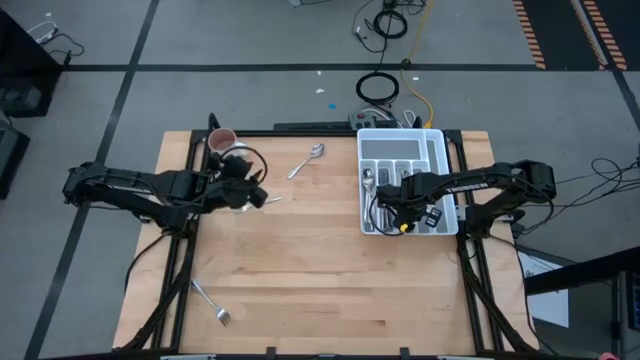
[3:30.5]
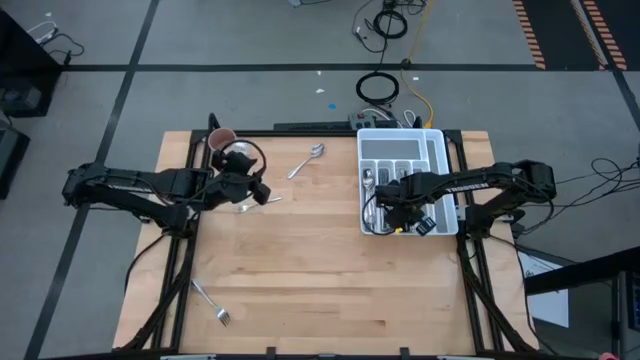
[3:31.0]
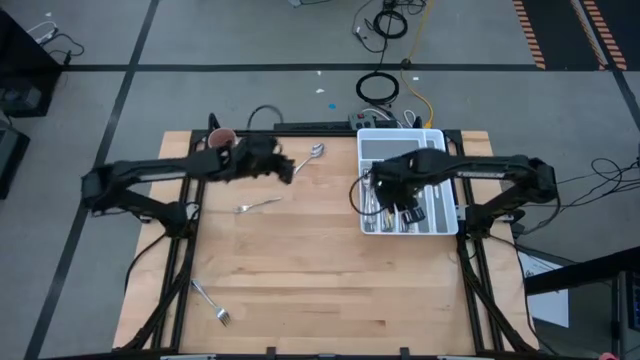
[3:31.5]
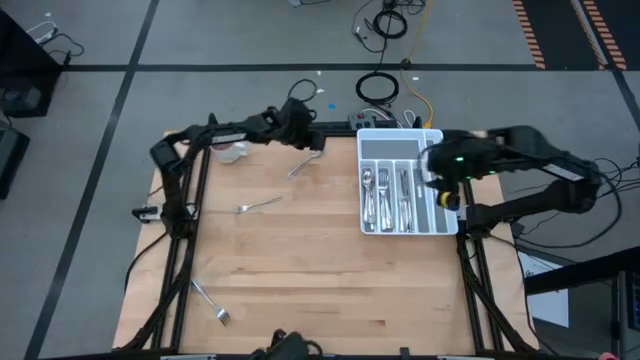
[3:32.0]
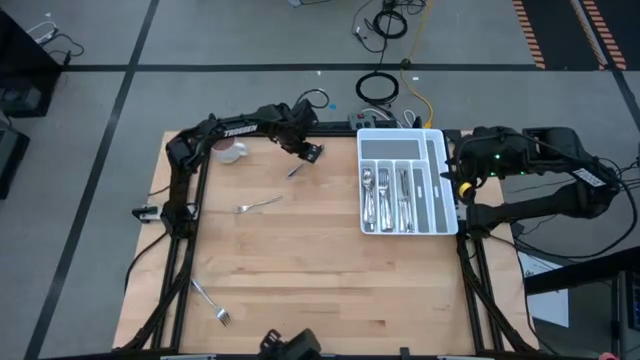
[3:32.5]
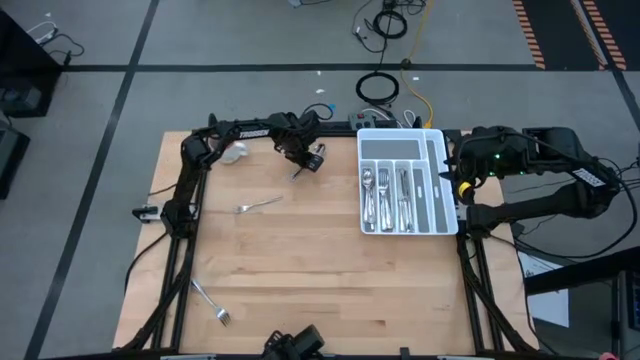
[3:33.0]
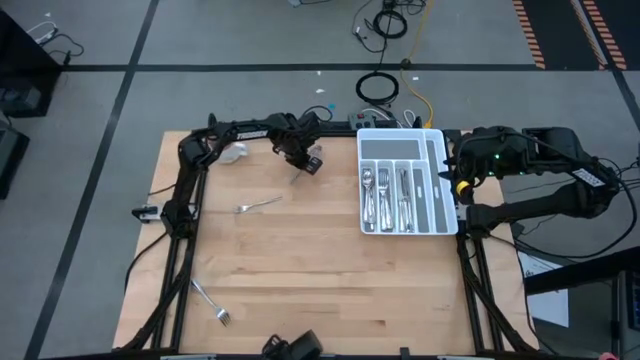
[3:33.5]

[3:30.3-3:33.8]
Task: Sort silverware
Put the silver spoon into the silverware tray

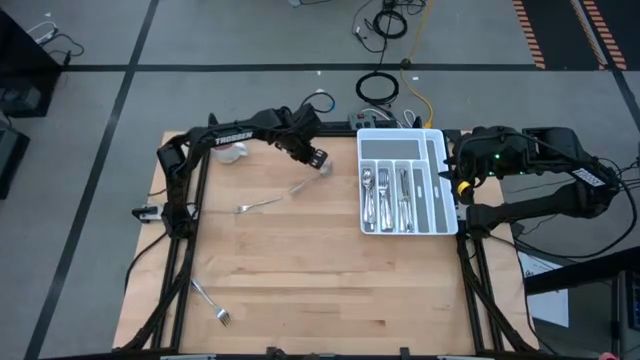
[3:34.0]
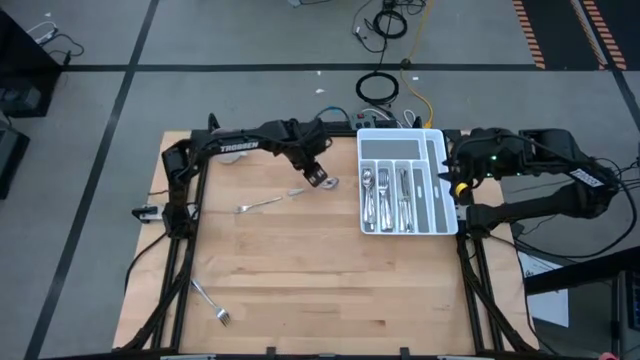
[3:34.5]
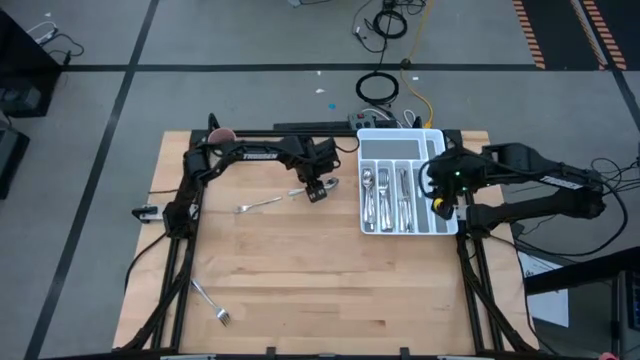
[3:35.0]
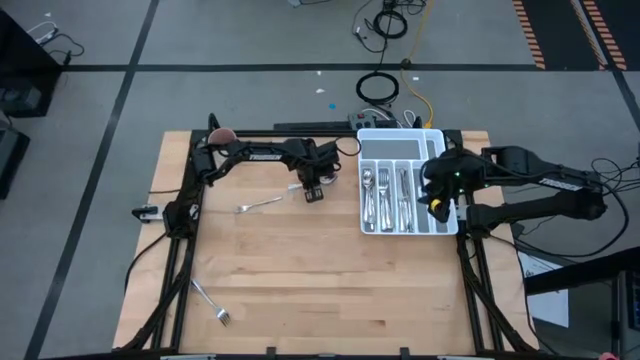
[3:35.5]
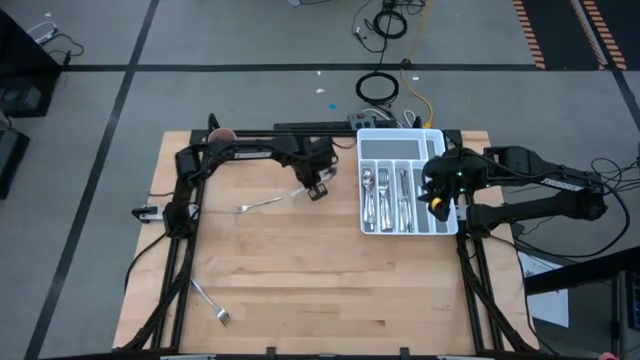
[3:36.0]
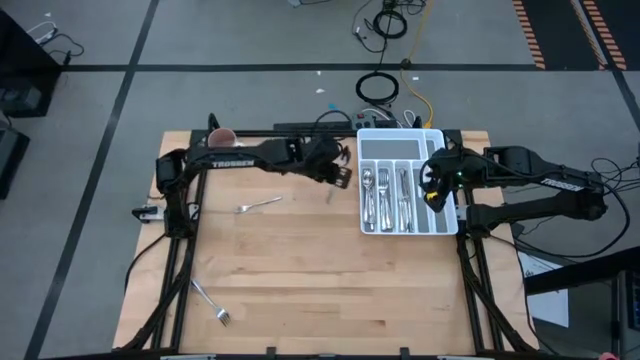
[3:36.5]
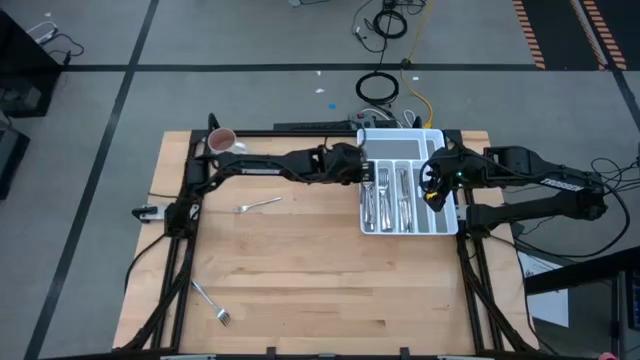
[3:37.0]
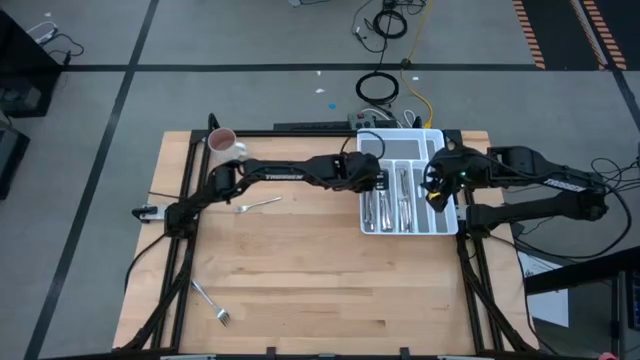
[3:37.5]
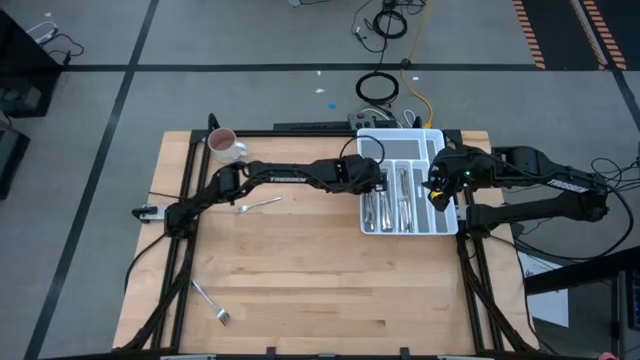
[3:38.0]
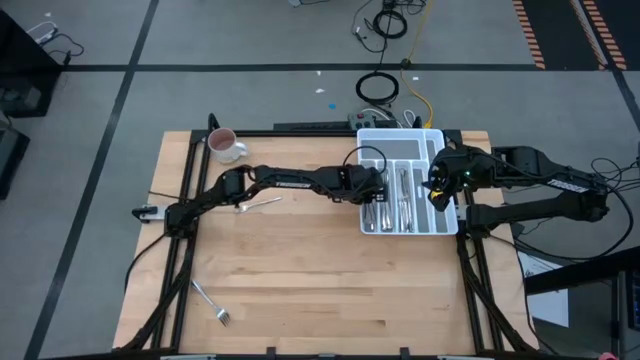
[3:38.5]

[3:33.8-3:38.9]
Put the silver spoon into the silverware tray

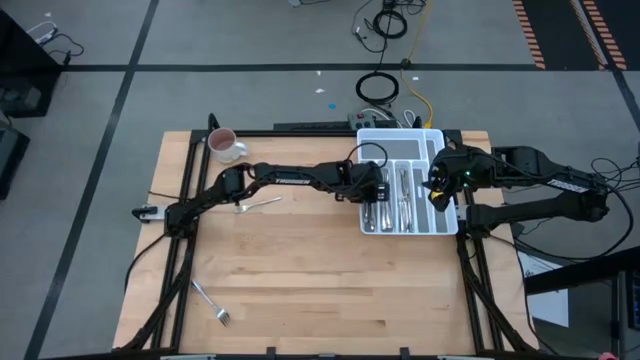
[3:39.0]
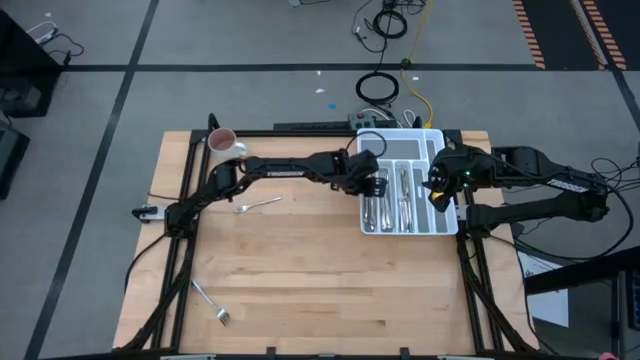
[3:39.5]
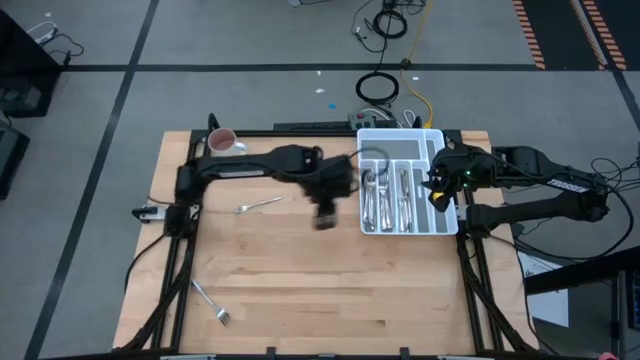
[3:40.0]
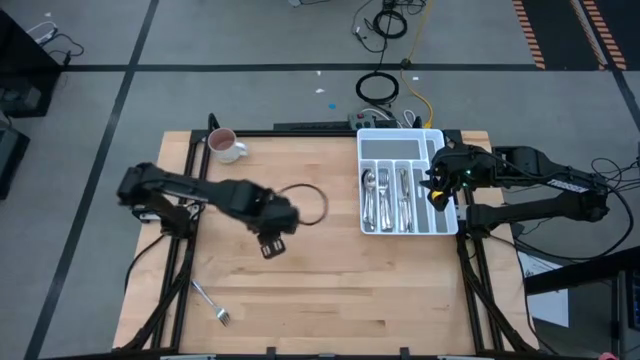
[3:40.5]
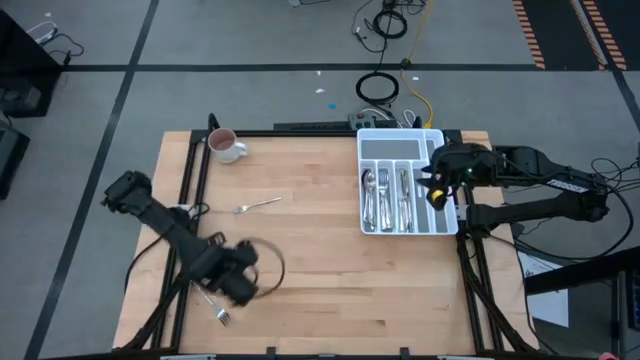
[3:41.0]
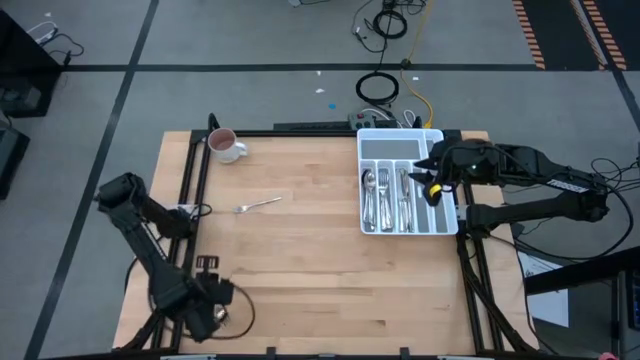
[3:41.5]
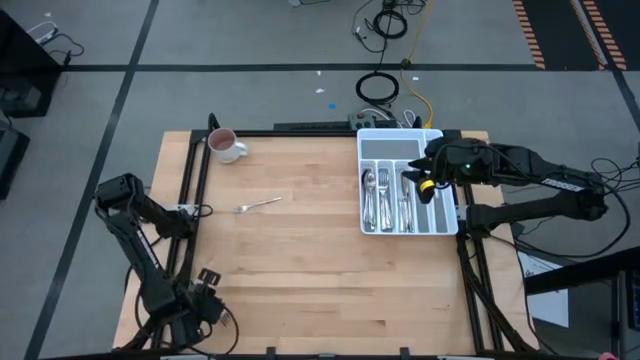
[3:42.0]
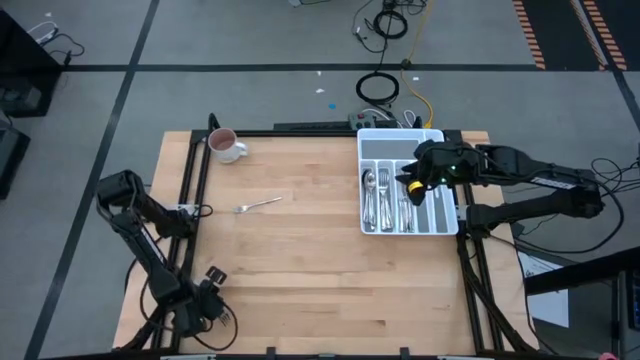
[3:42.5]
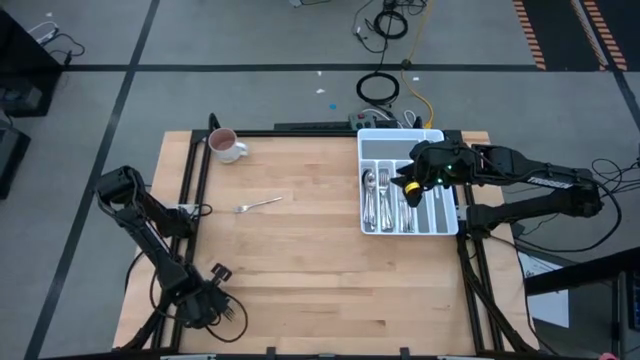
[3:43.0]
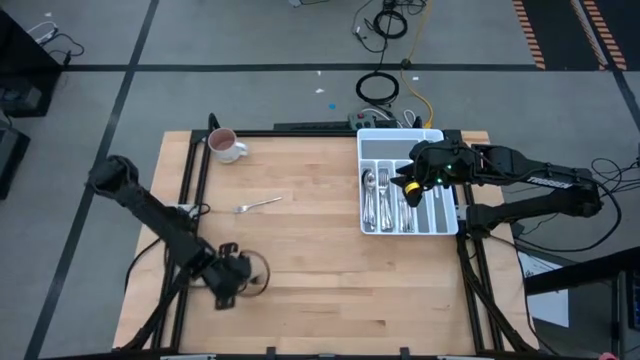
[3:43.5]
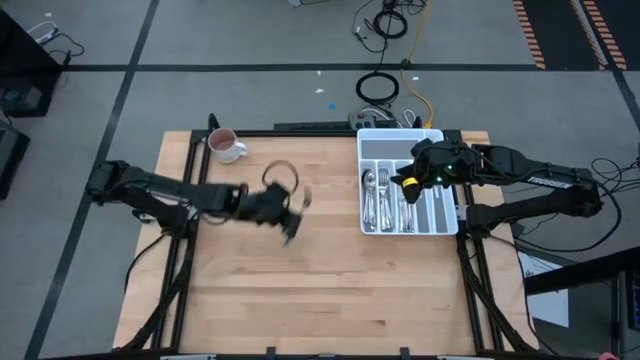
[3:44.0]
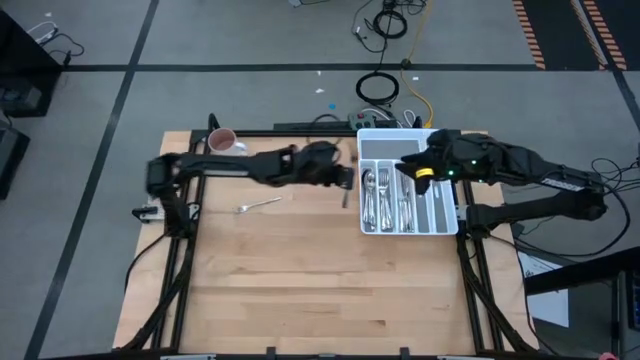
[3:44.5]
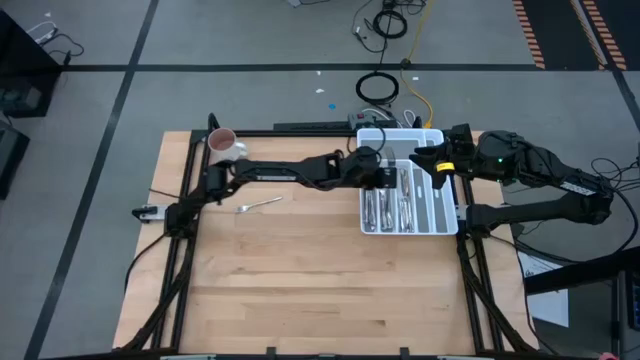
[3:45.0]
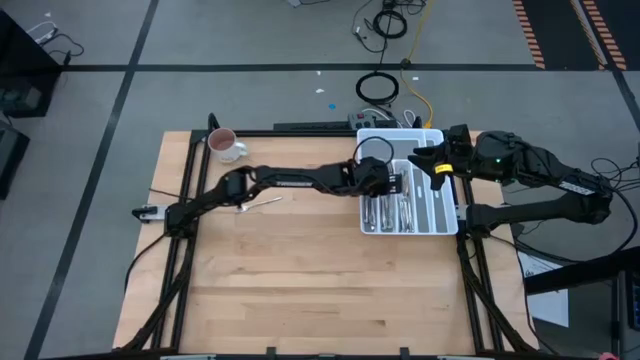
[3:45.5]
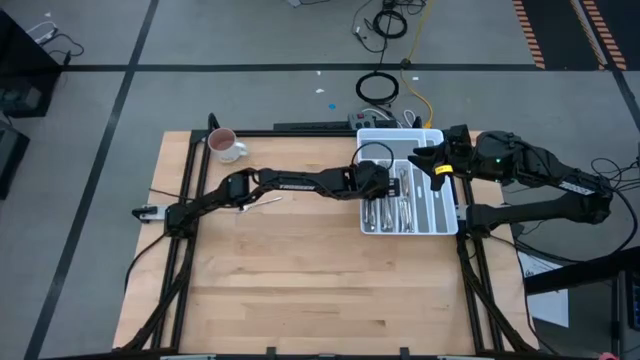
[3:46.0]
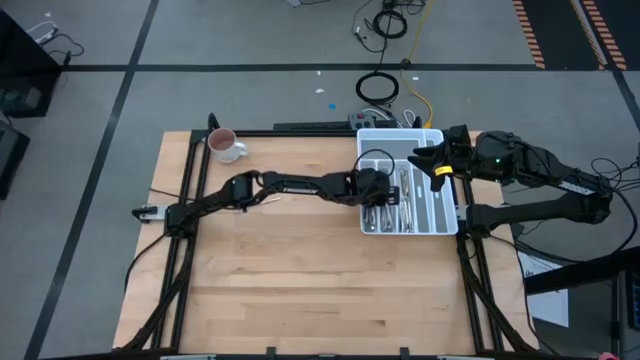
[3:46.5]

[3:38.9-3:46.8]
Put the silver fork into the silverware tray

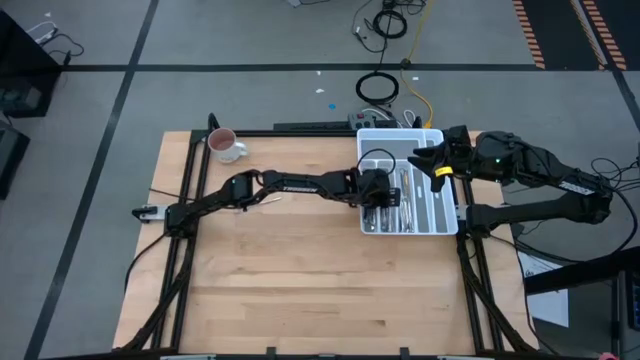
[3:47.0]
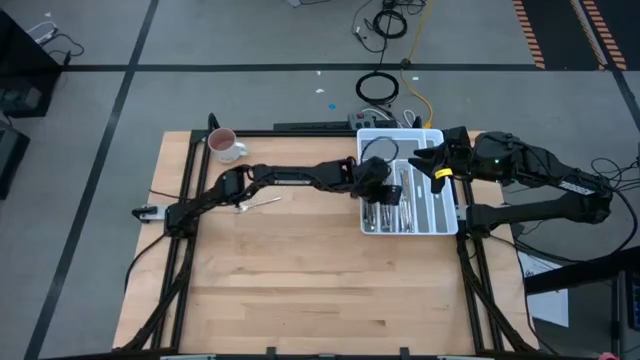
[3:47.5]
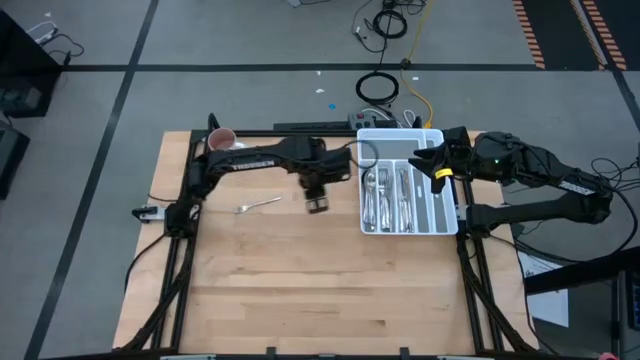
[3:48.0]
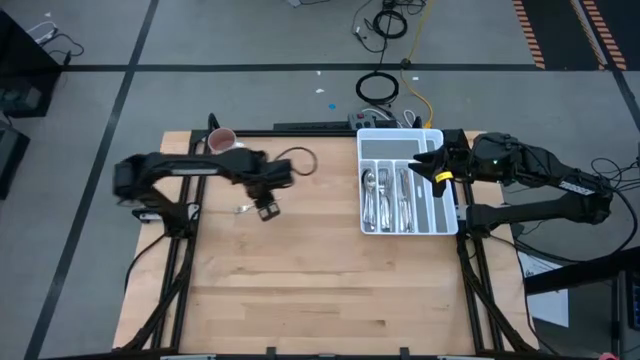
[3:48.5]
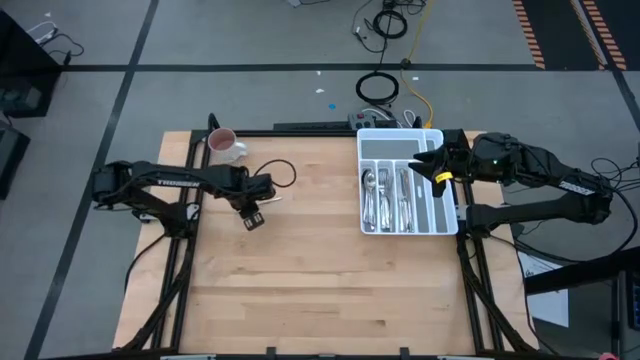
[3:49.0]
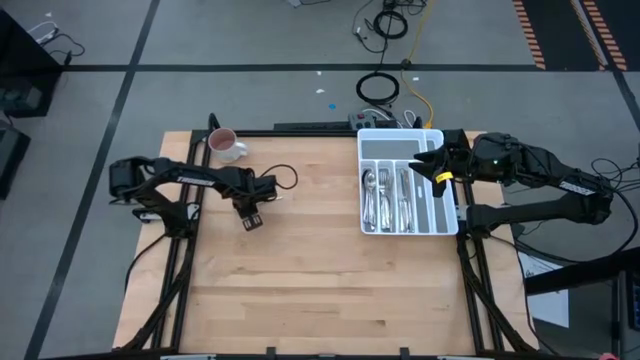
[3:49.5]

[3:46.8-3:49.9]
Put the silver fork into the silverware tray

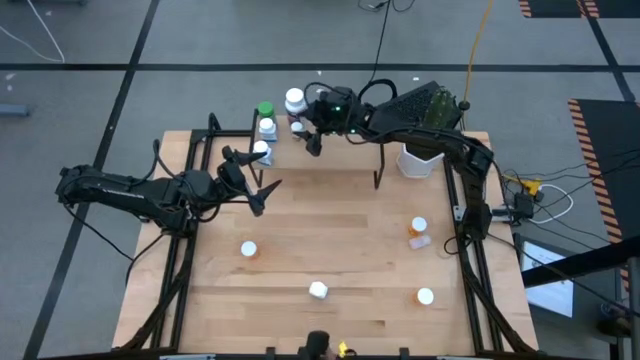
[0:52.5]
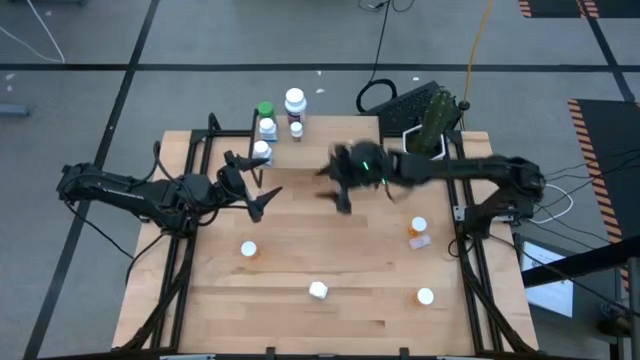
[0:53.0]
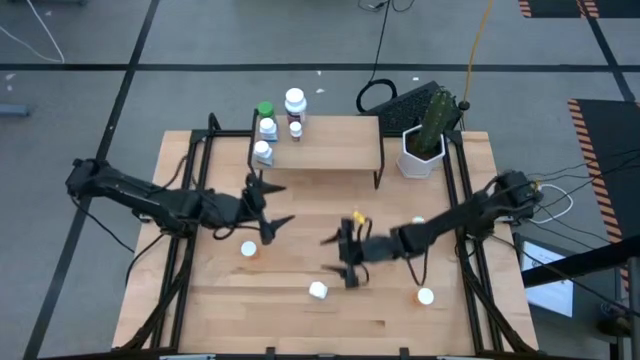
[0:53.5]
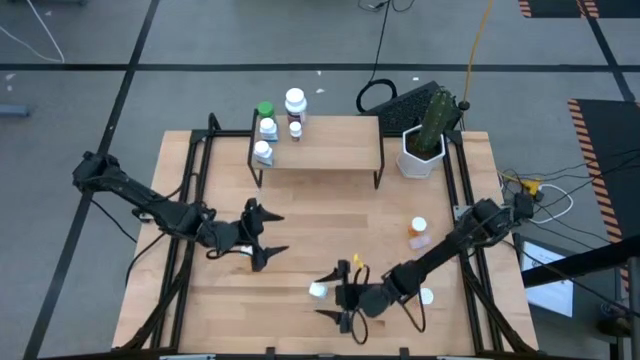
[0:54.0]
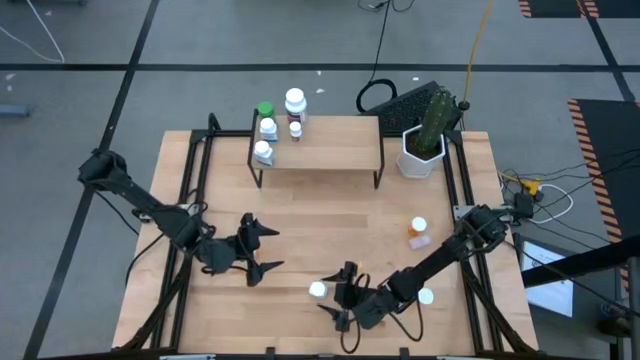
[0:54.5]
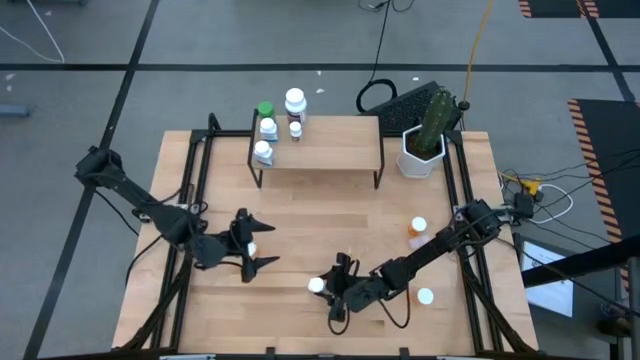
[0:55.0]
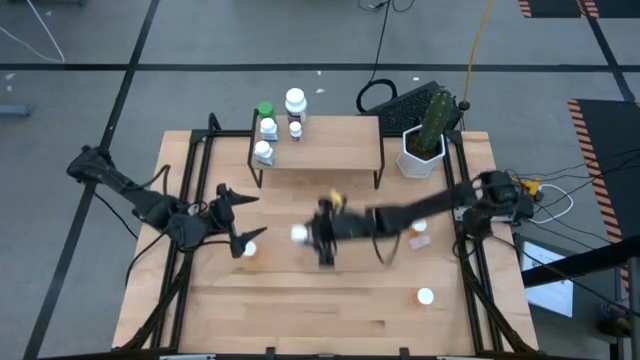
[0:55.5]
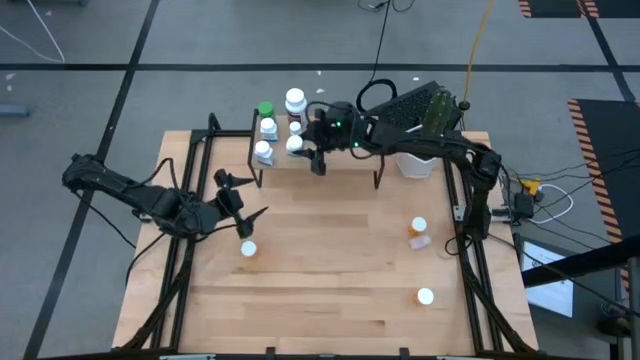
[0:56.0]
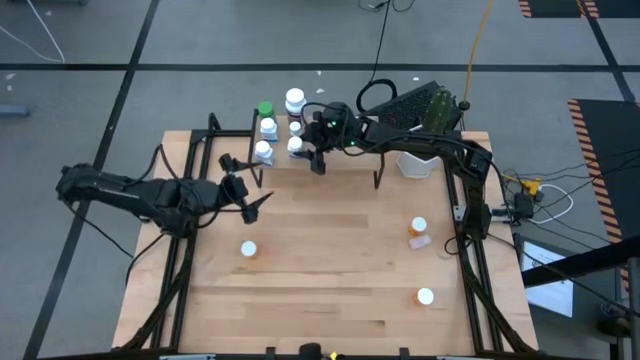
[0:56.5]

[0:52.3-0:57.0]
Task: Pick and place medicine bottles onto shelf by color
Put the white medicine bottle on the shelf
